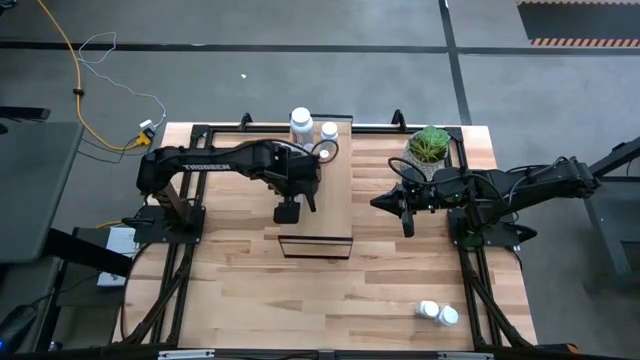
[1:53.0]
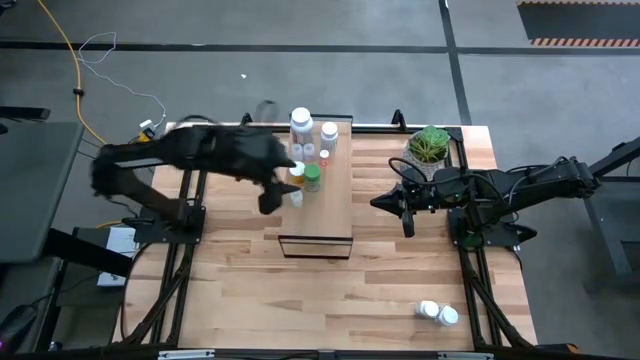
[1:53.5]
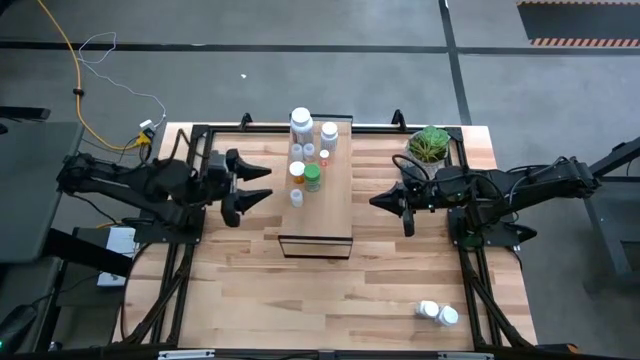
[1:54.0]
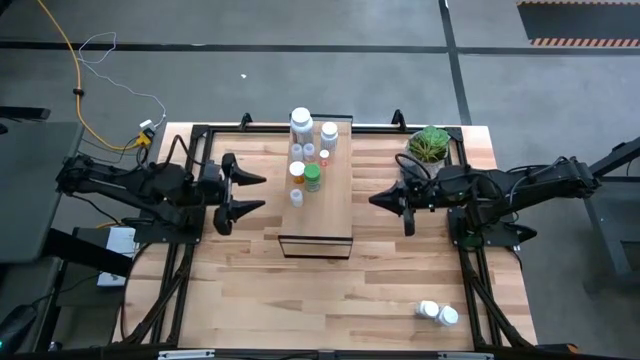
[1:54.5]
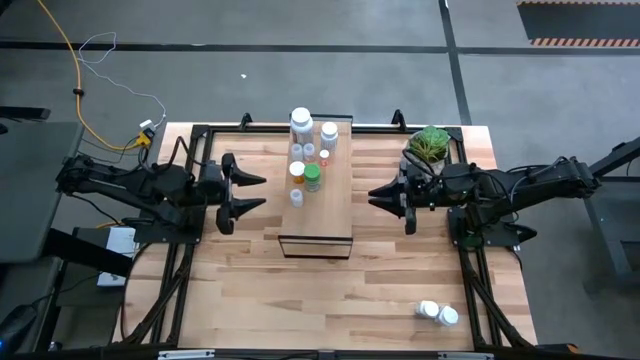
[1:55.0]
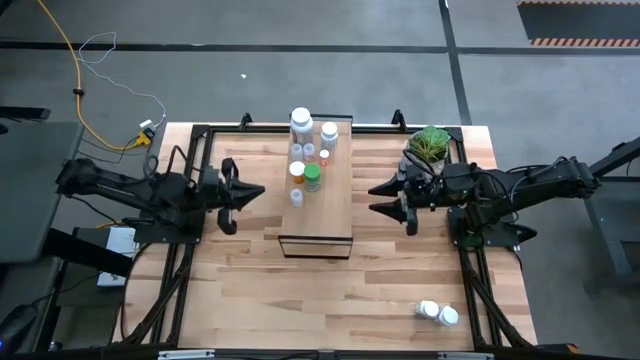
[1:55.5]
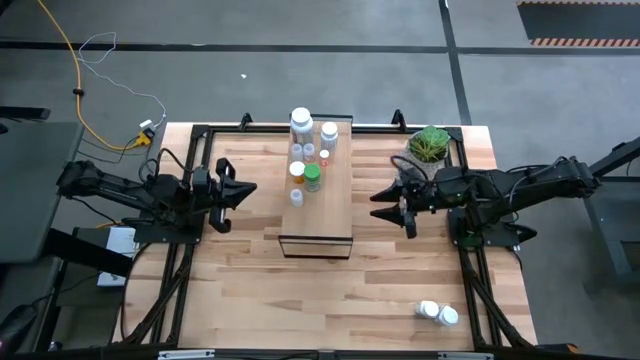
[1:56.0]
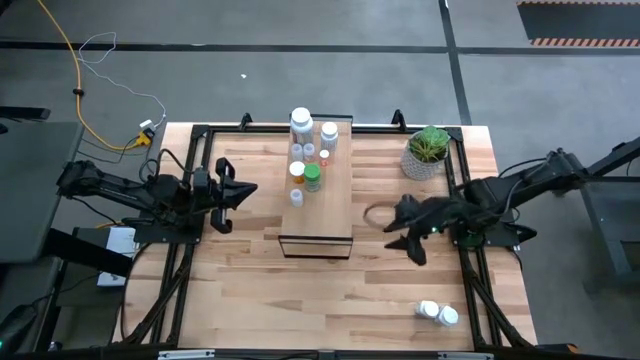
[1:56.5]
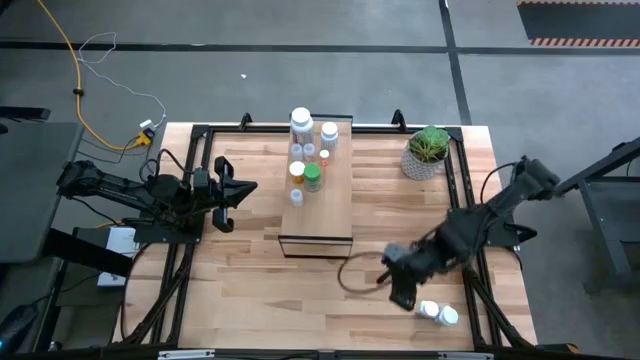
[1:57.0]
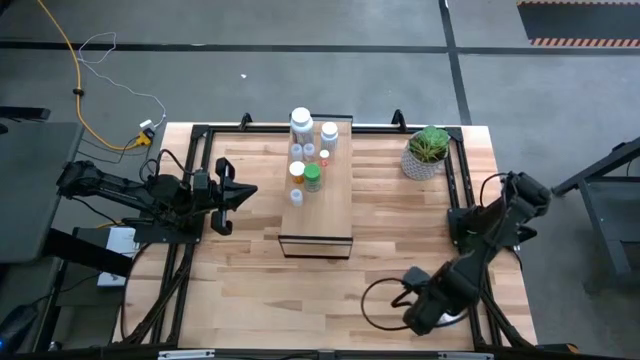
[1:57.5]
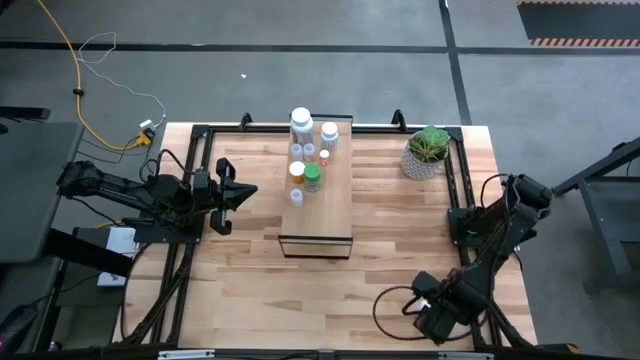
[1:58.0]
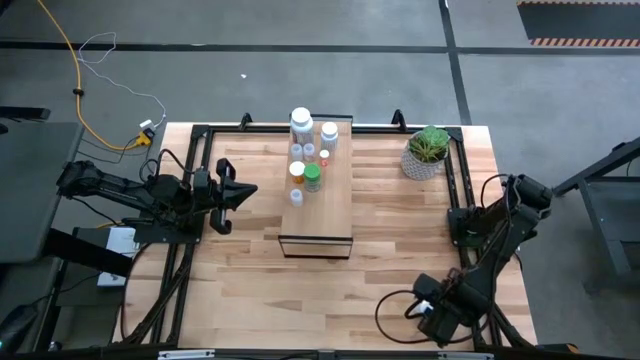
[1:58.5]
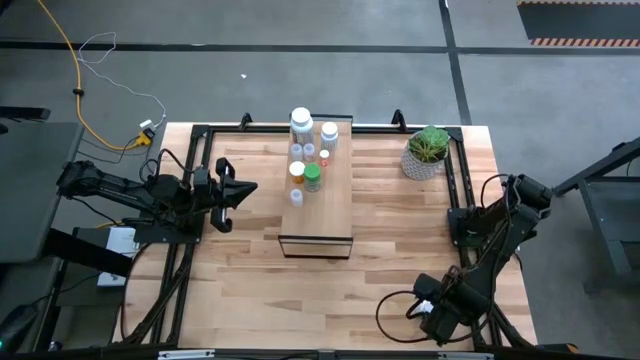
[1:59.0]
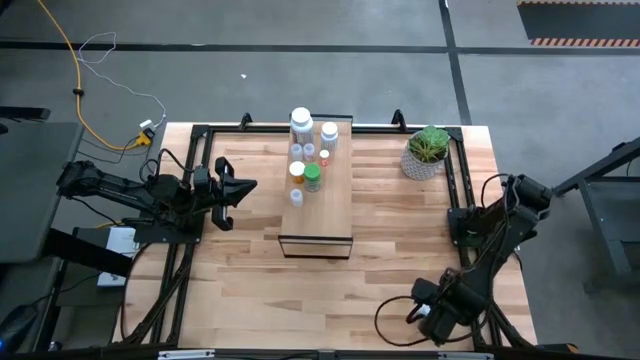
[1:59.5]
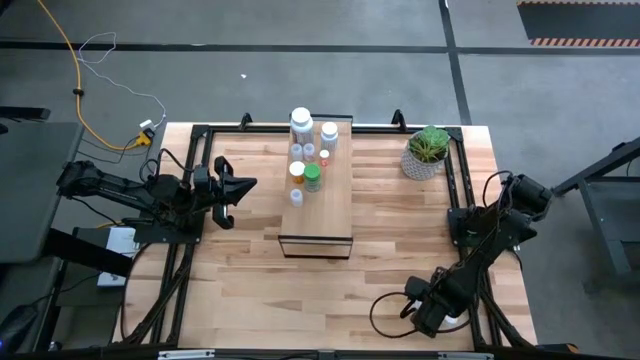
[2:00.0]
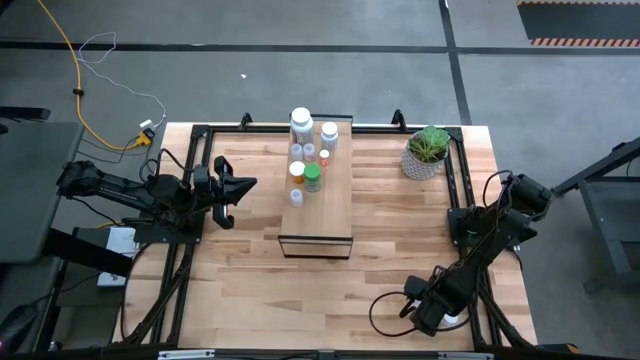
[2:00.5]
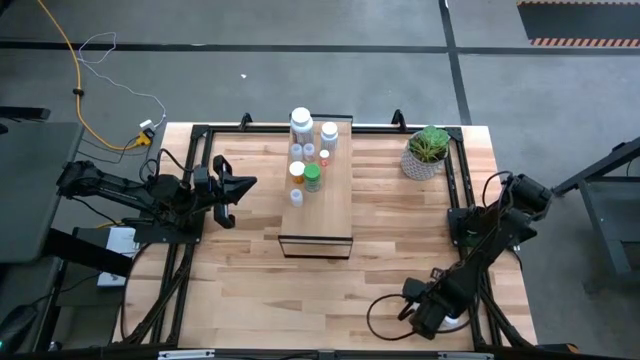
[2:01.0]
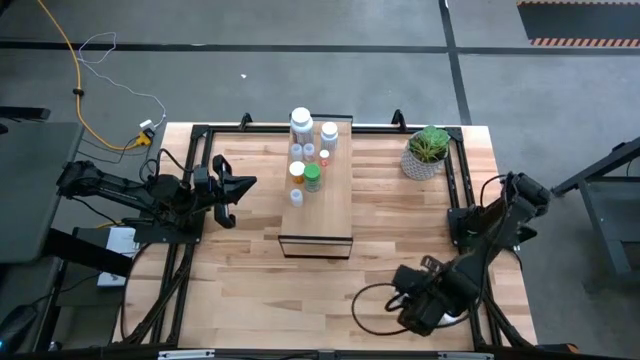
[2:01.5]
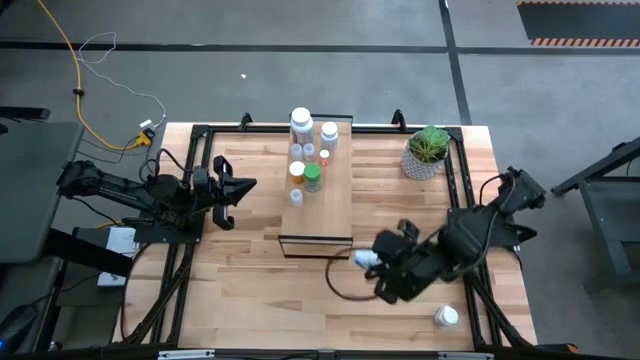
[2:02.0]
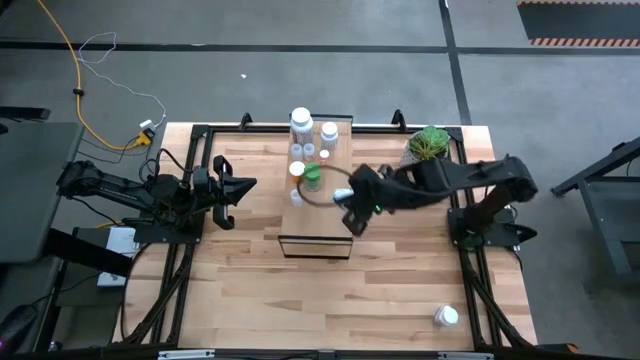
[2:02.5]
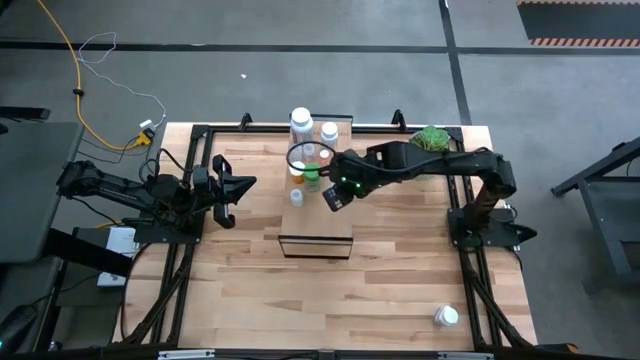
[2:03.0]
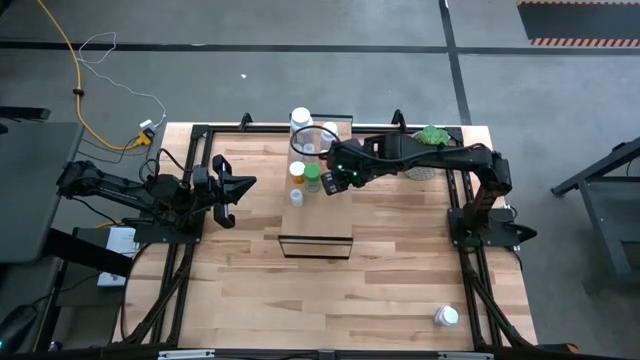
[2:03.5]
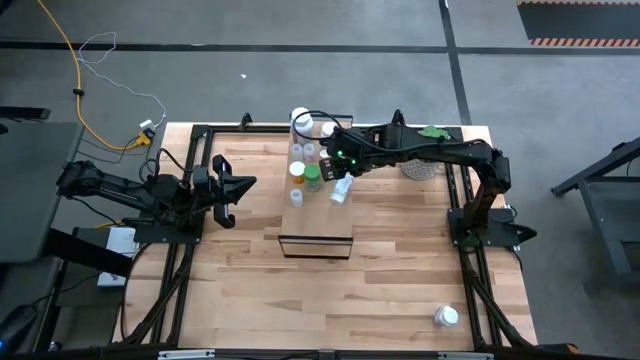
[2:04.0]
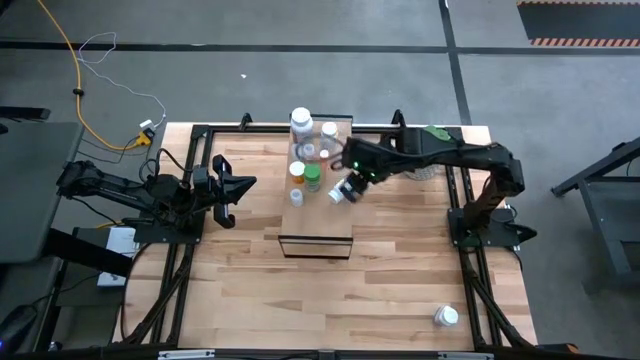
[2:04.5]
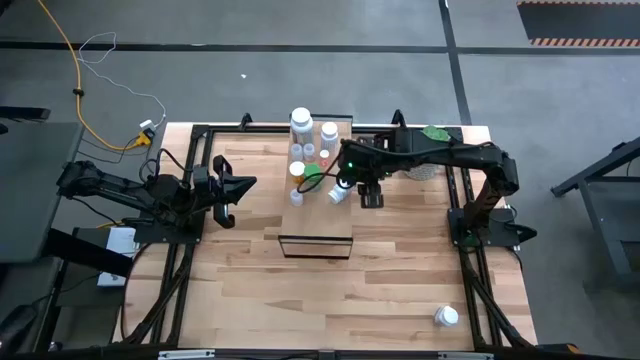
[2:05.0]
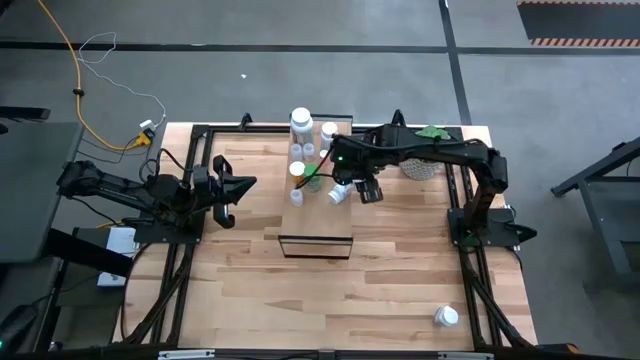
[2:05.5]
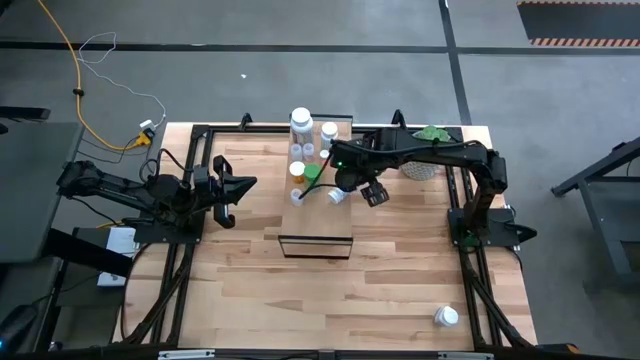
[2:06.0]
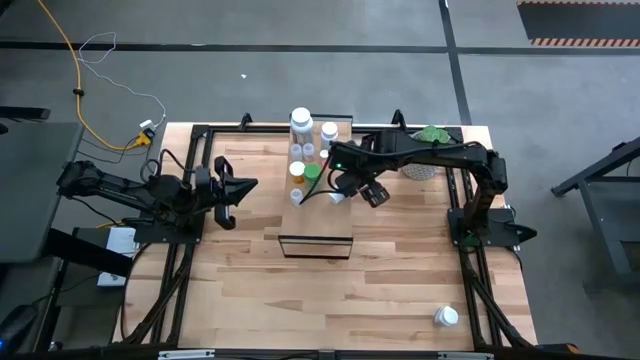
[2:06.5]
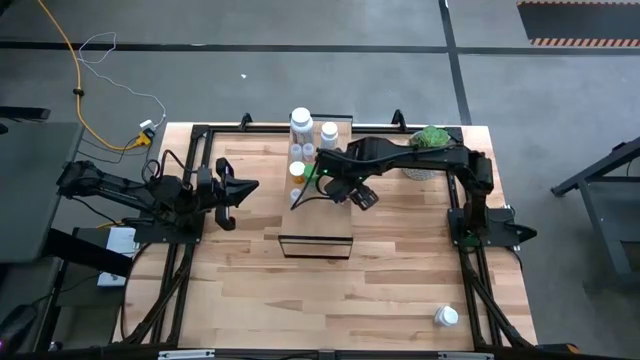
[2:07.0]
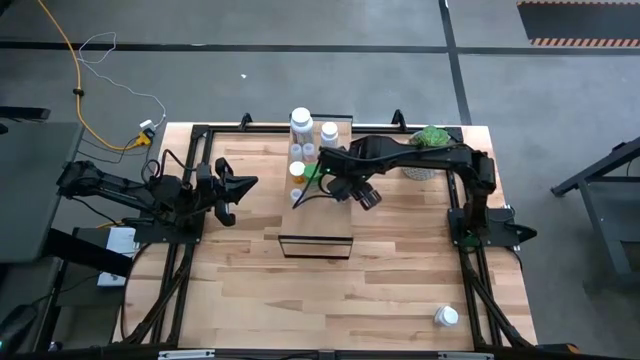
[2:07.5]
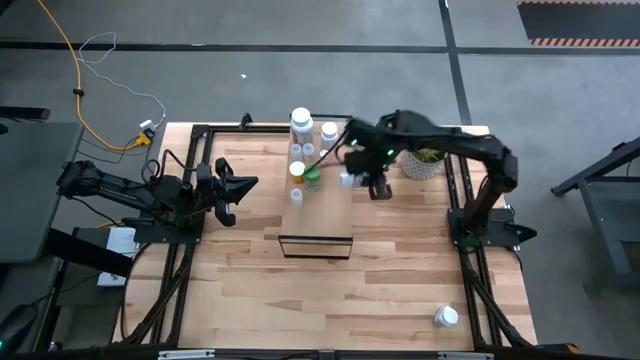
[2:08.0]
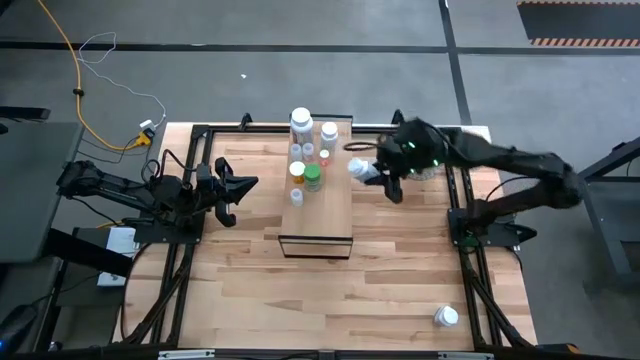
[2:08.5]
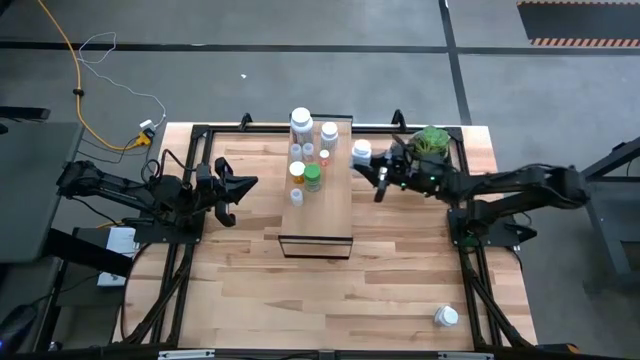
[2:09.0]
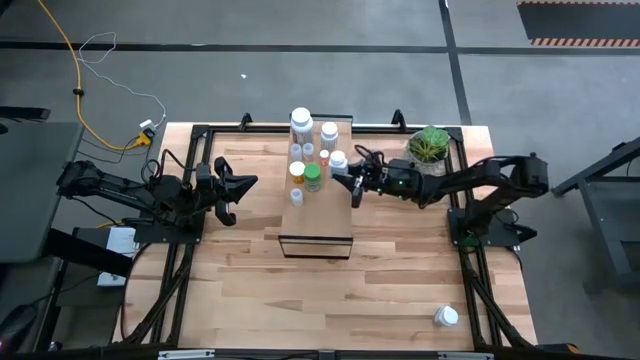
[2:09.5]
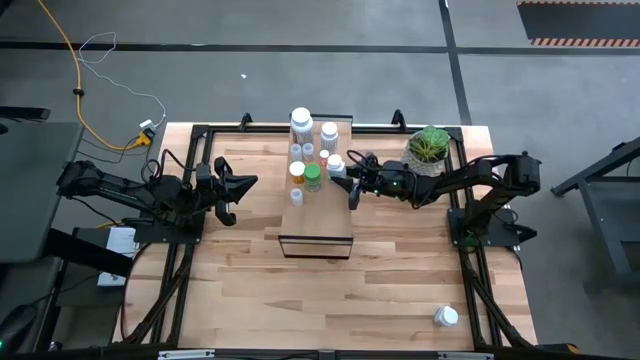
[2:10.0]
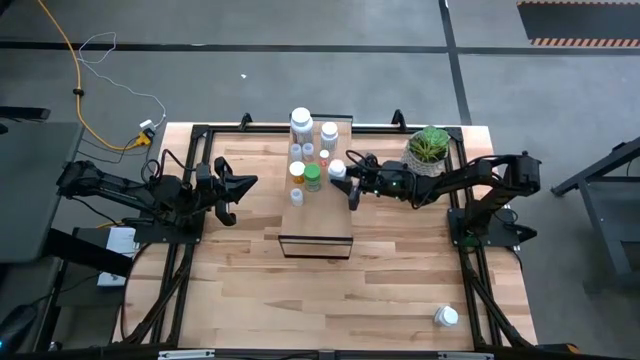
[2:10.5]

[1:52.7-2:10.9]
Task: Pick and place medicine bottles onto shelf by color
Put the blue medicine bottle
